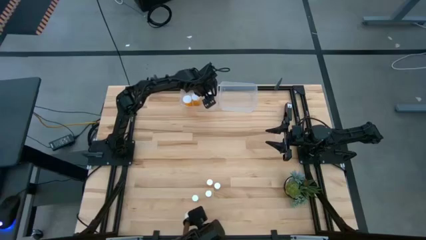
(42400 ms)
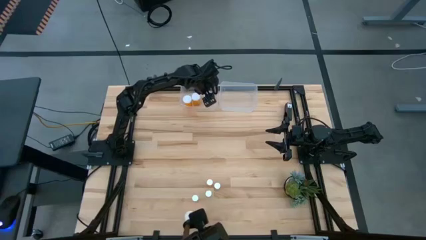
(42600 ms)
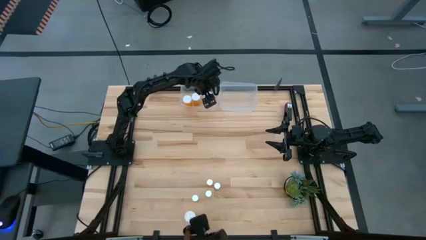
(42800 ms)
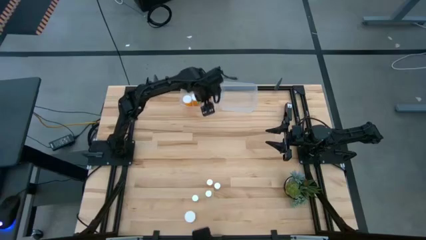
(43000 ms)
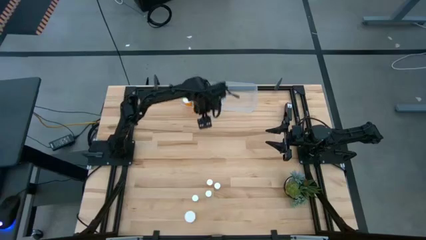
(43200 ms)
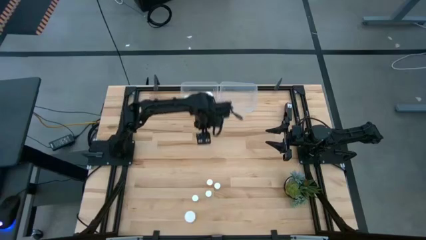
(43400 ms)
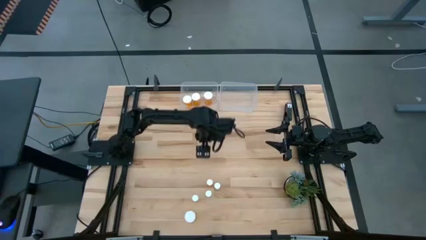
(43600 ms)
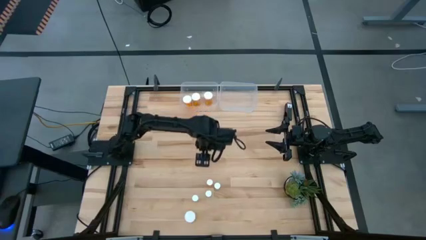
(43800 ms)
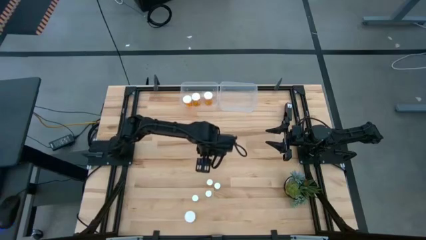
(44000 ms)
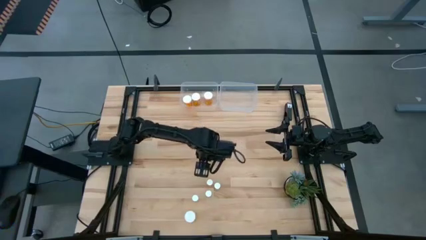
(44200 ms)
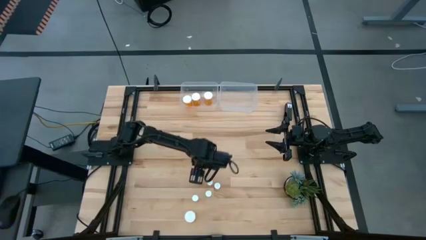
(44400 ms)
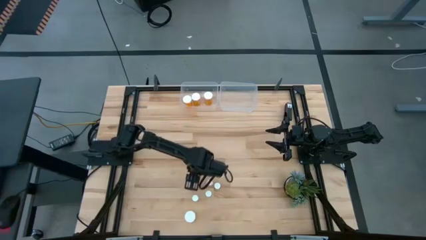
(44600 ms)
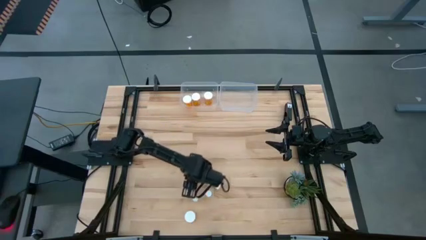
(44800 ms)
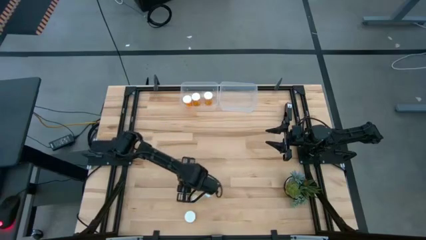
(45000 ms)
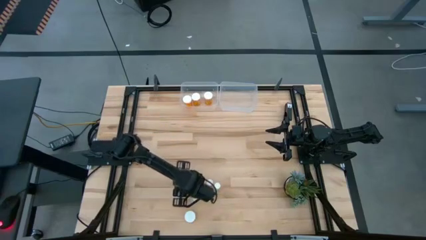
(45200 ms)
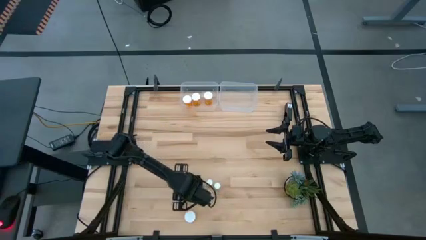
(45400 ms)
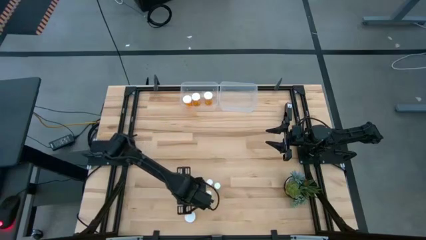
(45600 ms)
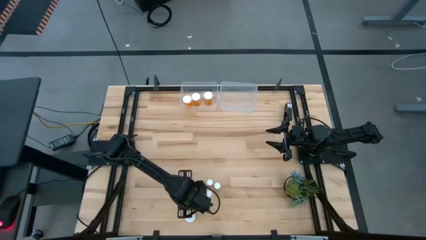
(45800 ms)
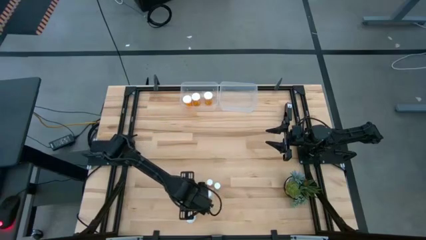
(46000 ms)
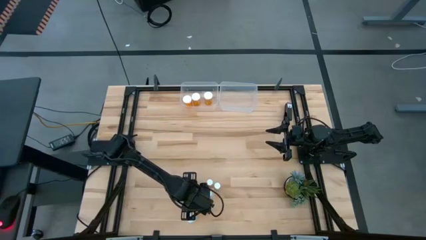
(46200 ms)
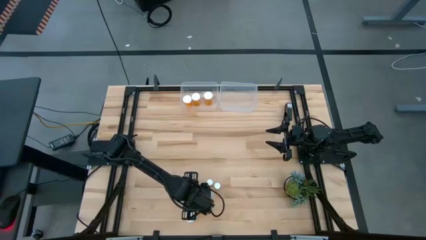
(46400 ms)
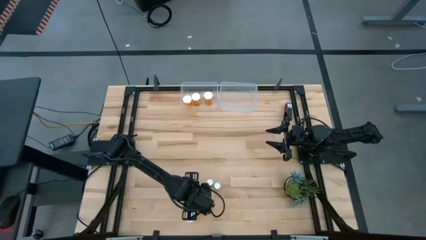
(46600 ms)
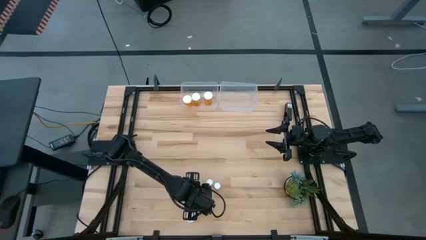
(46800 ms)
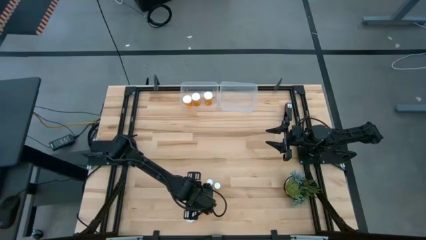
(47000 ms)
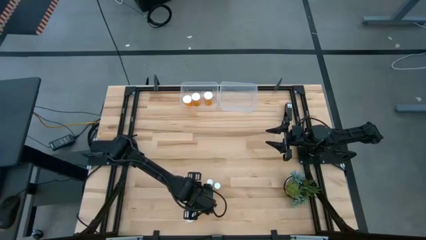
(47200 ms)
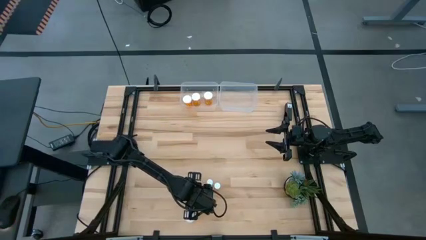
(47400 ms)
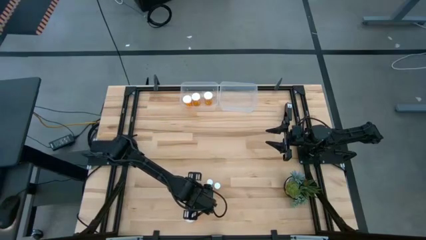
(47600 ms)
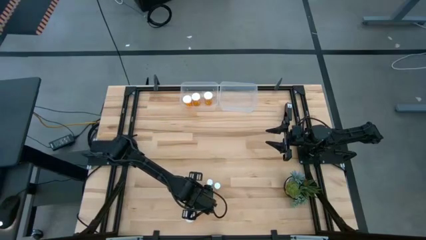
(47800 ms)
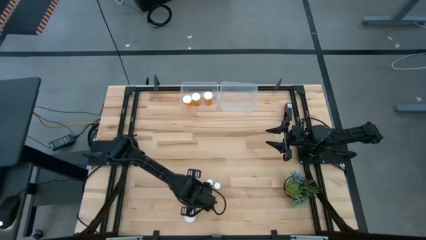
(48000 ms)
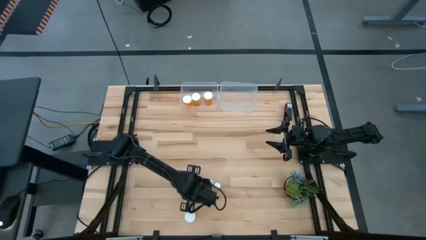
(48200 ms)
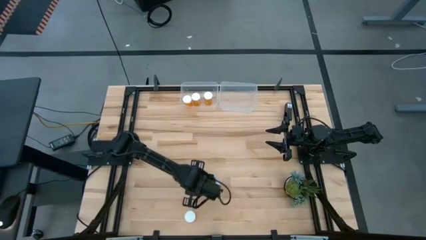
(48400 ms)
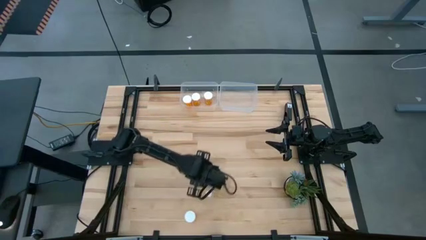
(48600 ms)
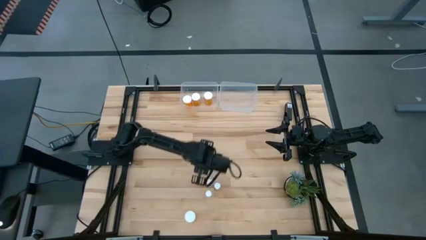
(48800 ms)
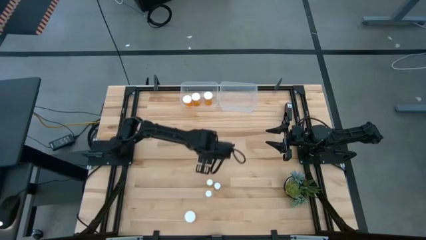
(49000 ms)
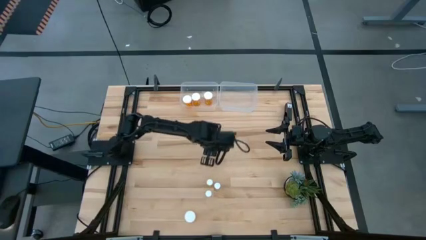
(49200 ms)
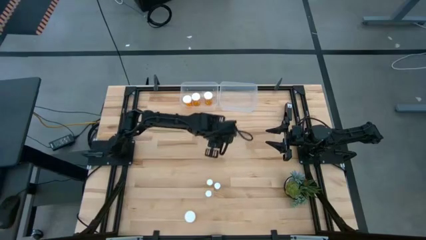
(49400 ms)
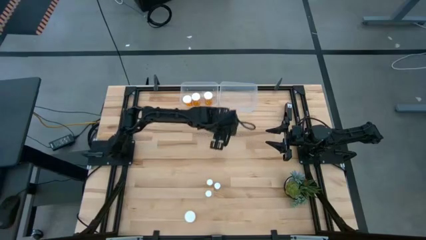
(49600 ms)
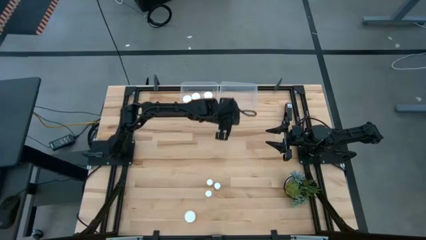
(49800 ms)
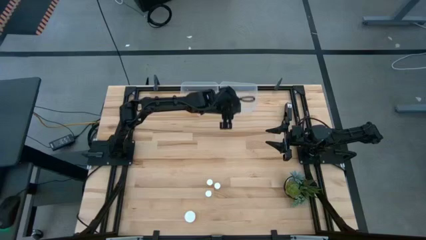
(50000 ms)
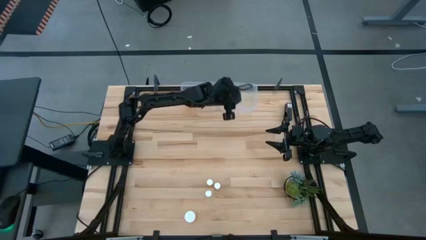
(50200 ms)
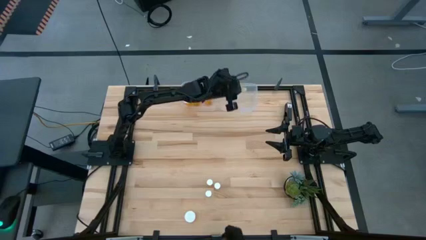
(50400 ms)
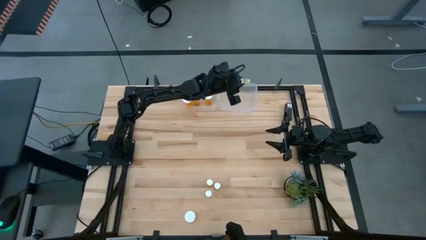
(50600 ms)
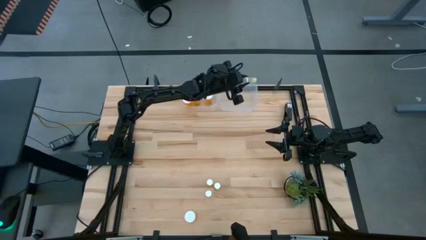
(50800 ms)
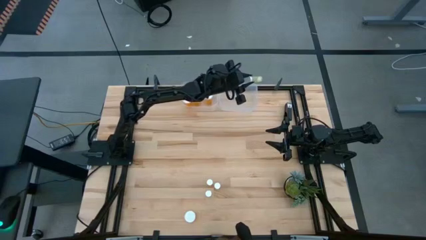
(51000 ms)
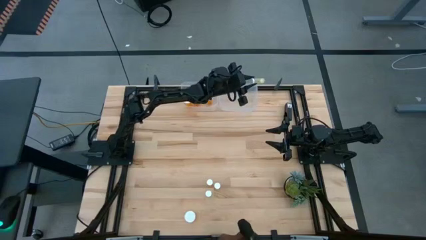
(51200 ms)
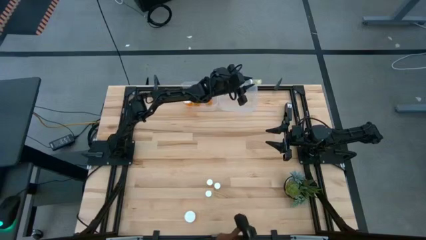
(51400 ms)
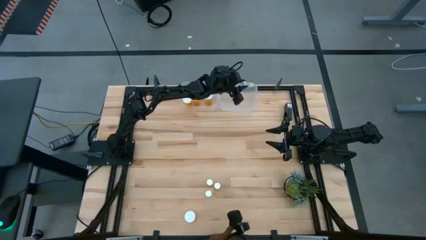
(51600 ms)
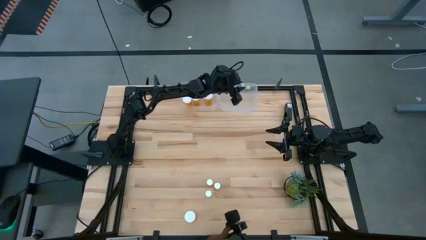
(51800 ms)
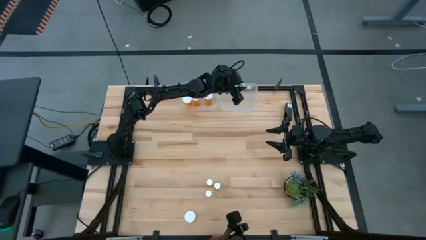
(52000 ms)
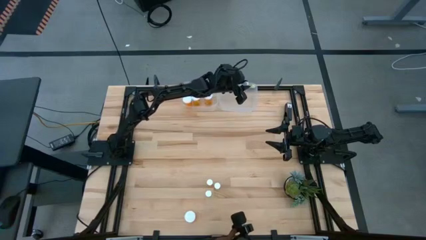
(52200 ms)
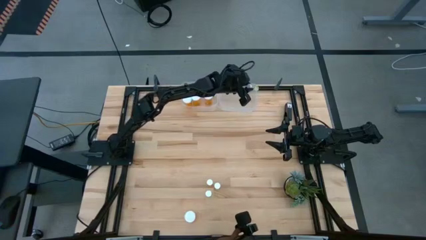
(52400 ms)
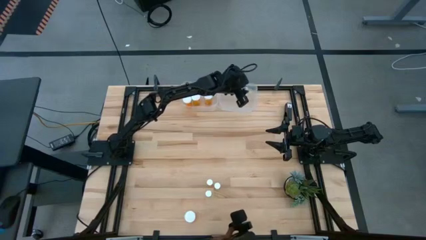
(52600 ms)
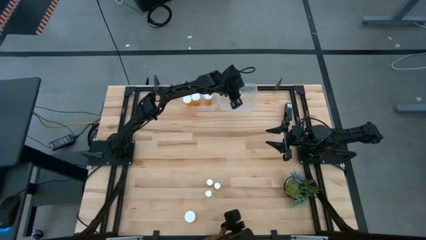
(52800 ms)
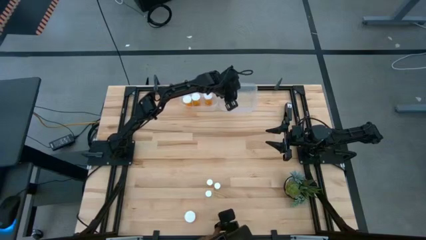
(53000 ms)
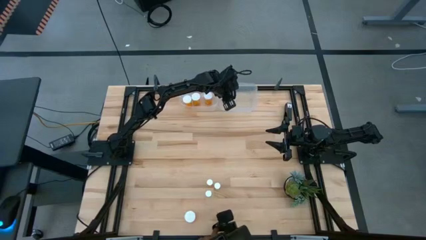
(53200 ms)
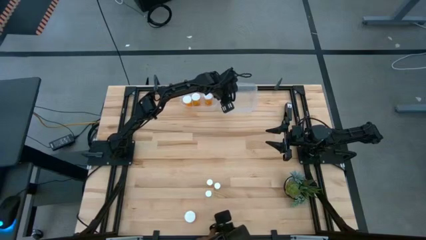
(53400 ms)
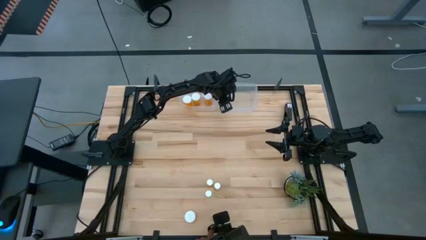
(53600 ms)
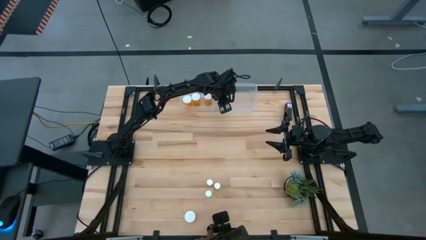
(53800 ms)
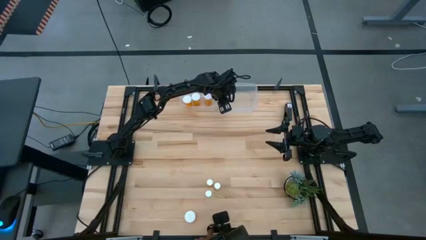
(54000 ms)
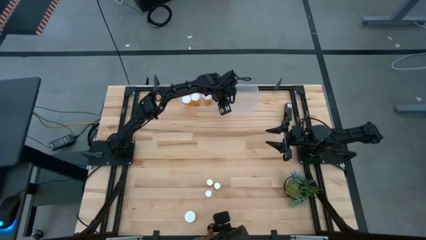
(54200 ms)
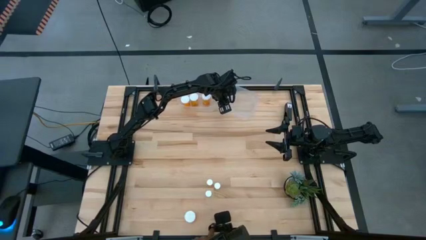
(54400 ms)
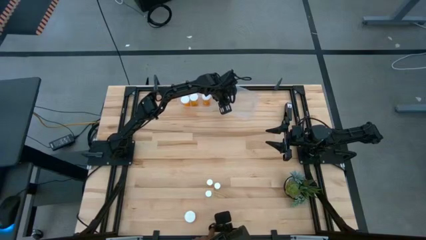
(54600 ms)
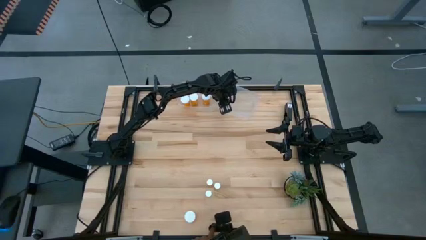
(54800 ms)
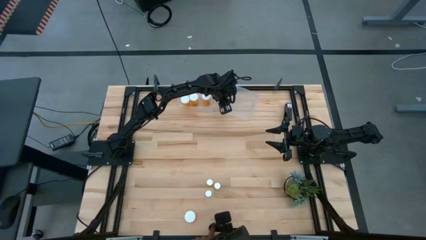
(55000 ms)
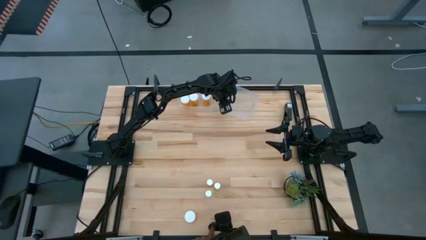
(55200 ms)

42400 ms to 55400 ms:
Task: Pick and place medicine bottles into bin by pill shape (circle, oval)
Put the yellow pill bottle into the right transparent bin

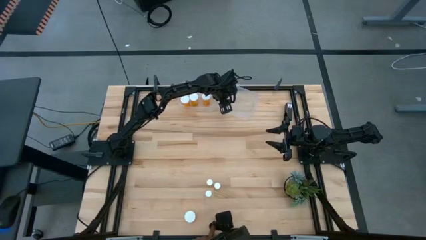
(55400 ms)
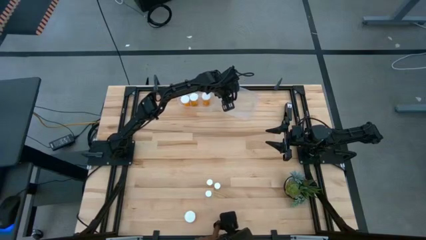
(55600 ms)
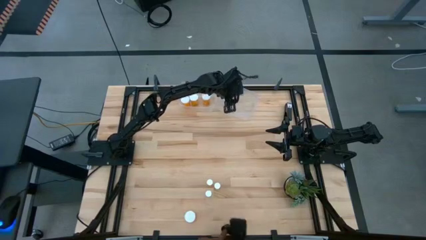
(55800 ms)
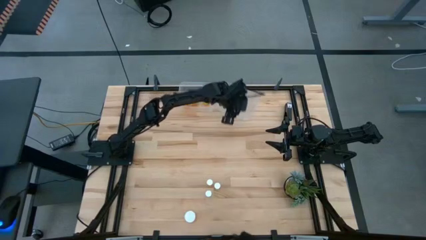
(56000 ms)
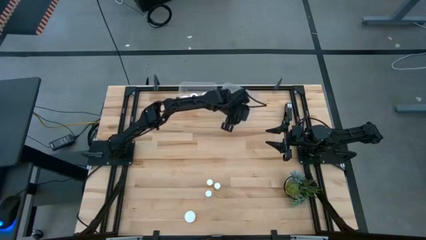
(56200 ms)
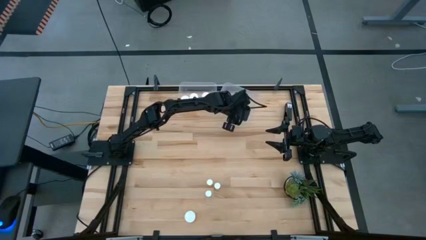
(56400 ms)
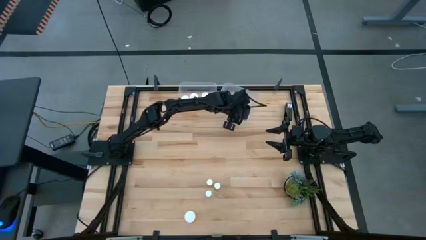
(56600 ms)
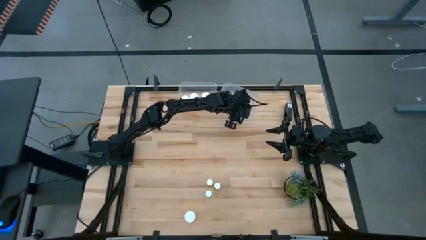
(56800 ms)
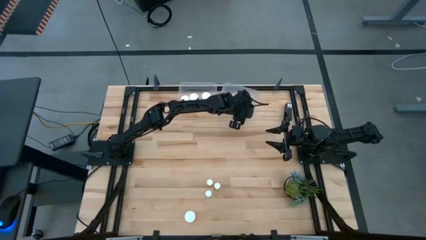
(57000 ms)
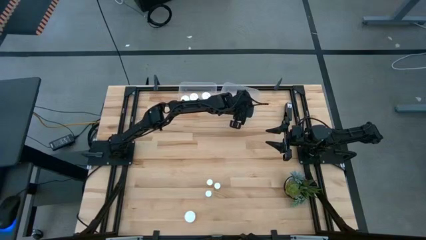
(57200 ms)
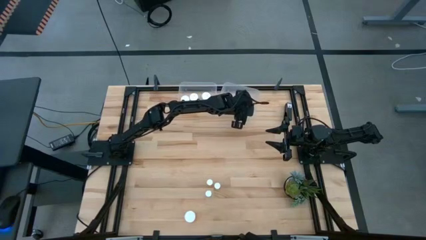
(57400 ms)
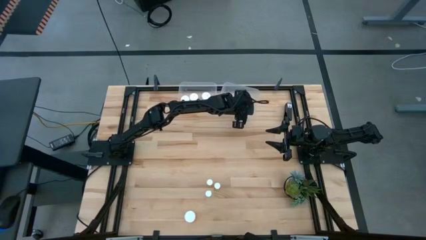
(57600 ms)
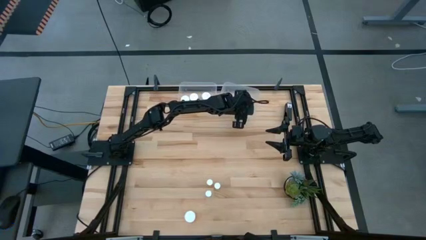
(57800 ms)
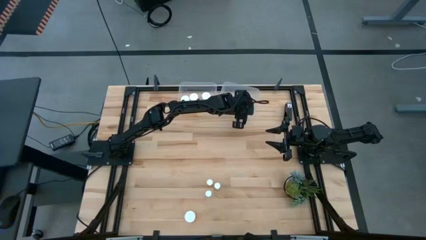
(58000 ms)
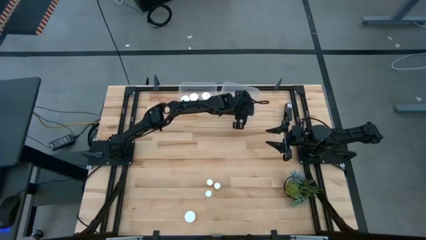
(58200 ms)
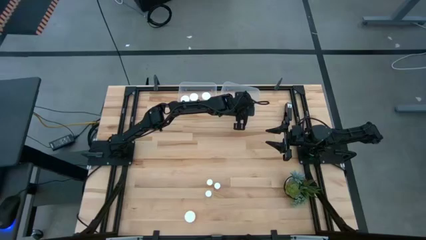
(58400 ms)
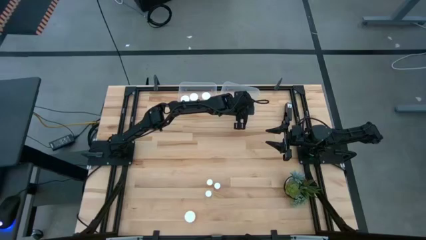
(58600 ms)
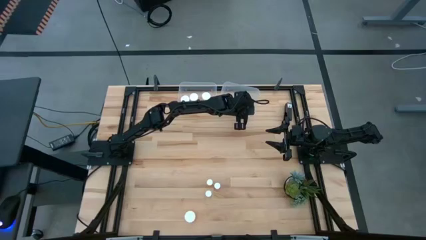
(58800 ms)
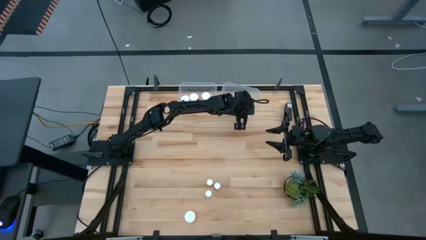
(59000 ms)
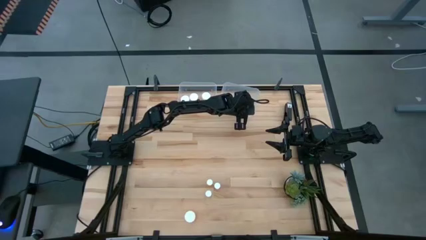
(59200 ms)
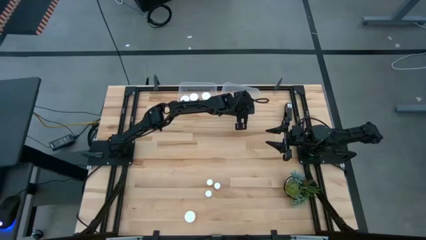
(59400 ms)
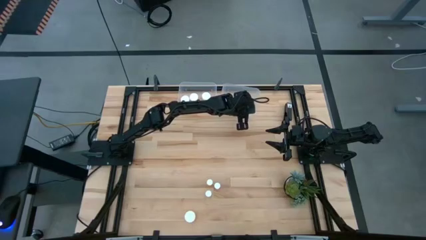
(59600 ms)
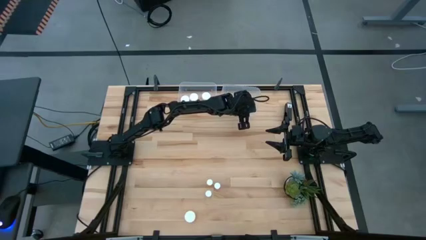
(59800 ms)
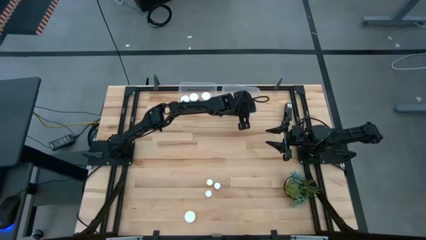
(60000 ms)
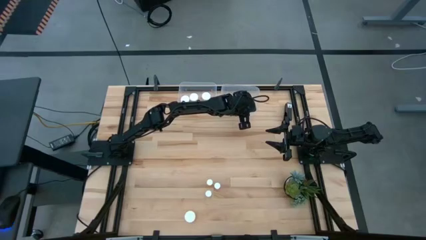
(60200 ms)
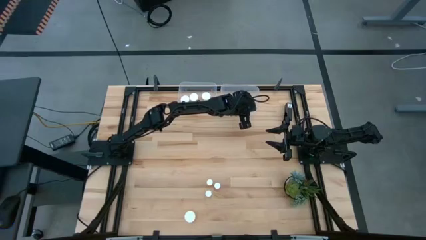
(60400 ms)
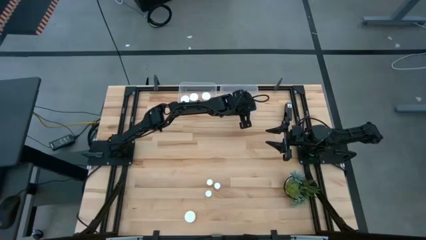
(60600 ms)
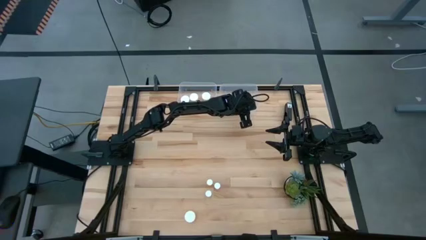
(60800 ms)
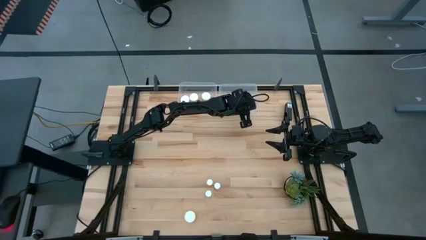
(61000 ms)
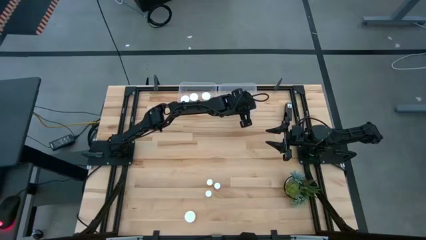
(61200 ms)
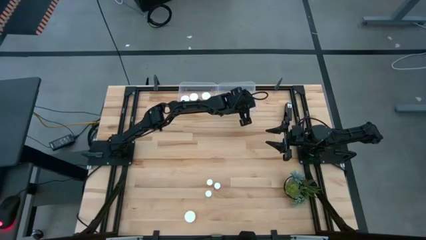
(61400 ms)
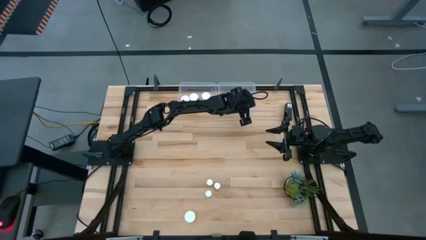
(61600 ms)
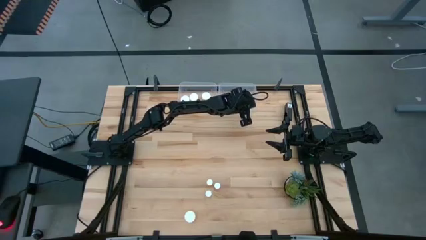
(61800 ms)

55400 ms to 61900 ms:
Adjust the right transparent bin
